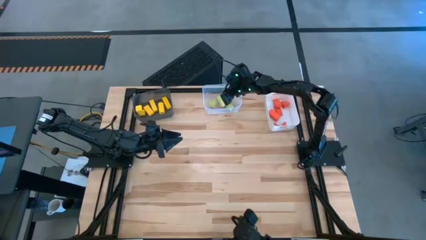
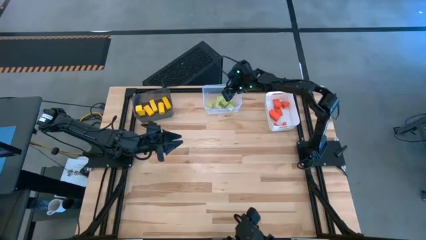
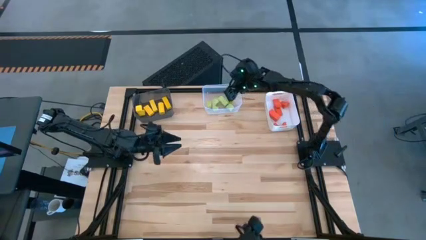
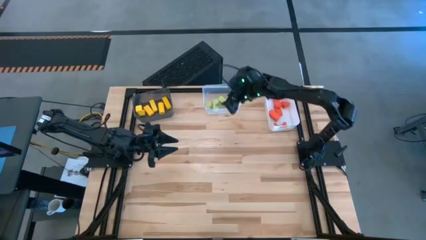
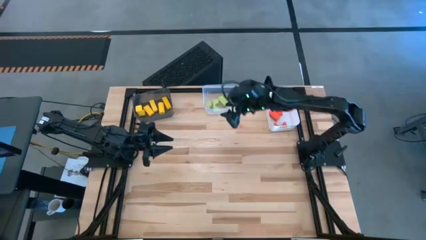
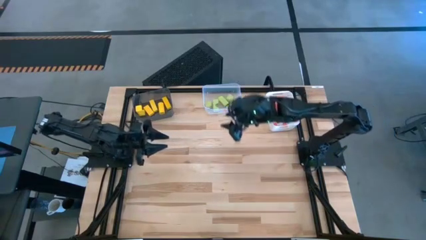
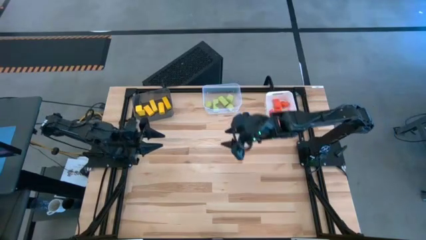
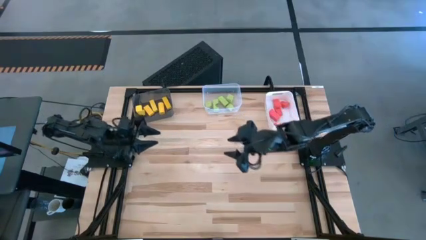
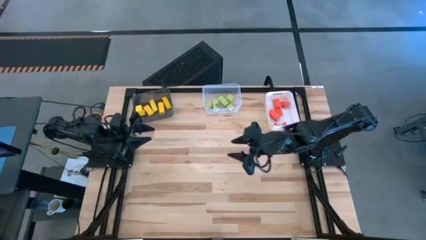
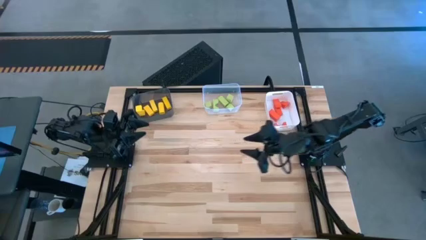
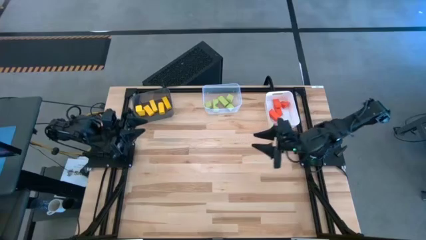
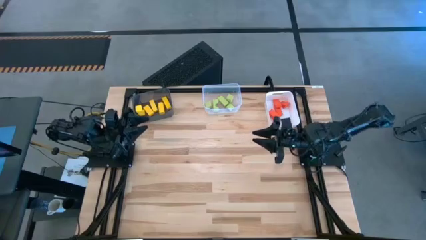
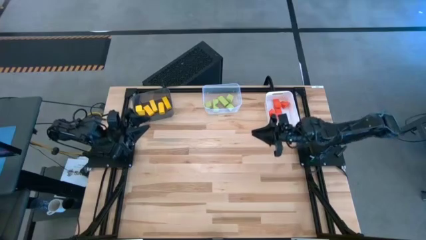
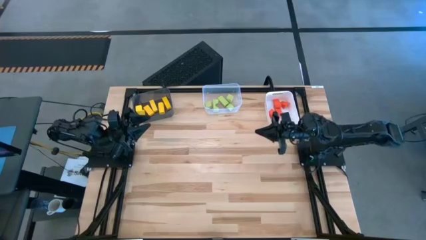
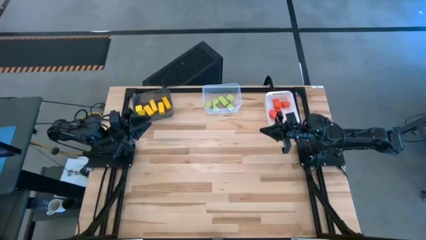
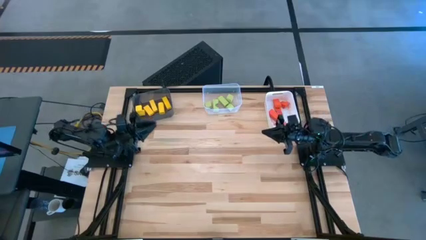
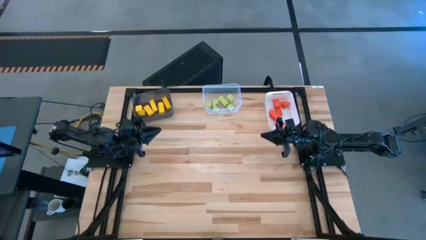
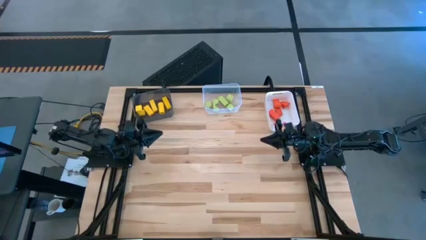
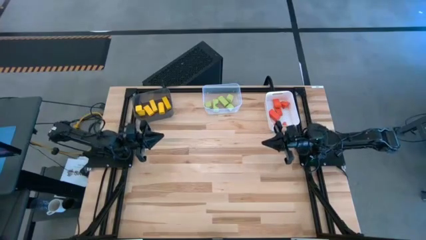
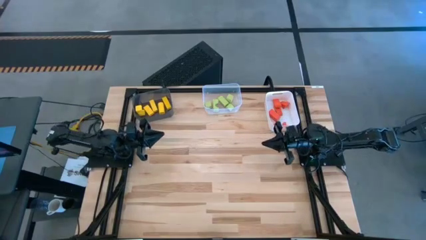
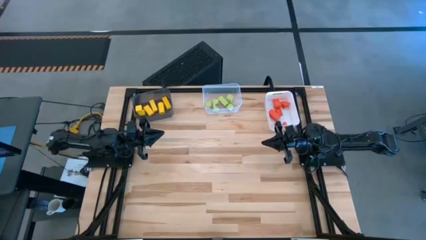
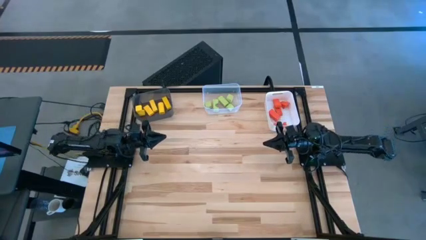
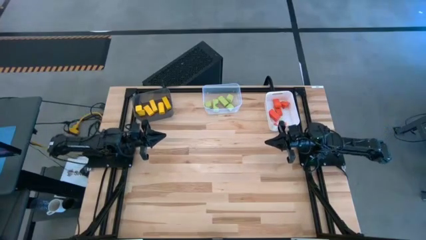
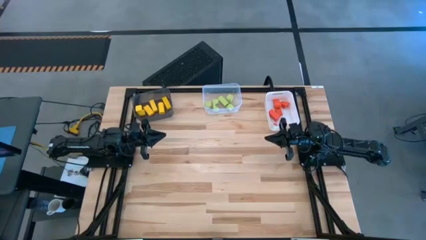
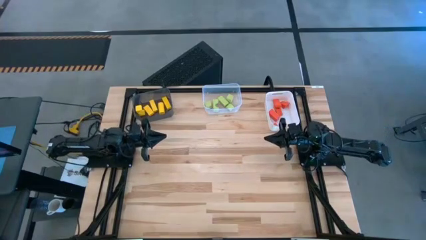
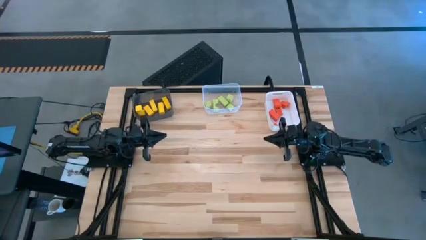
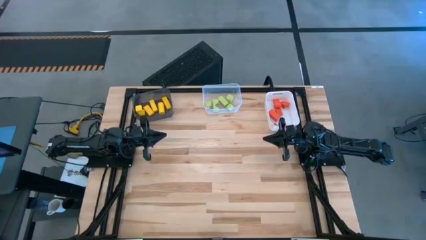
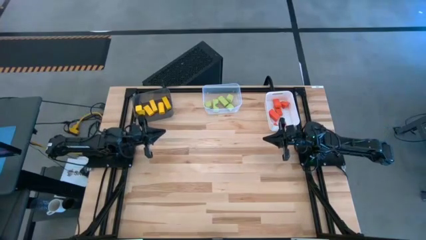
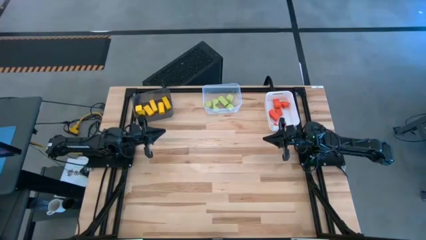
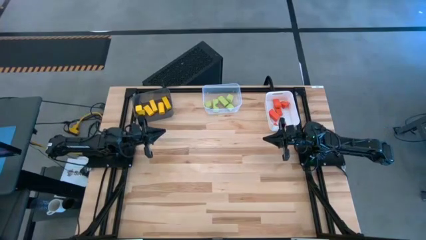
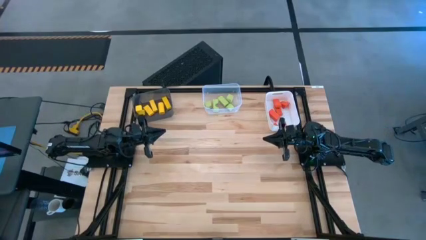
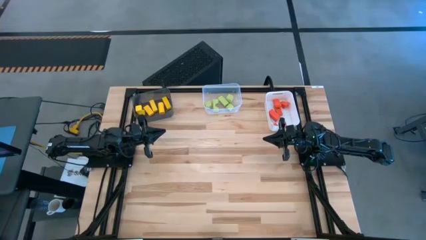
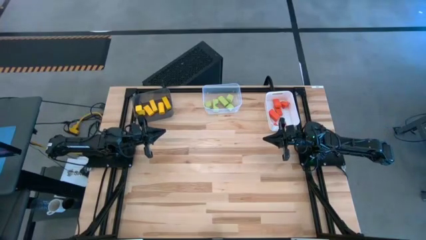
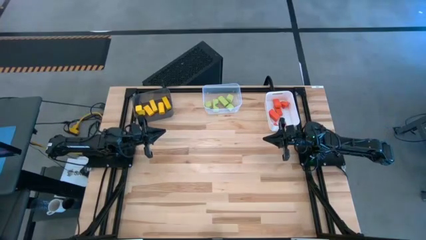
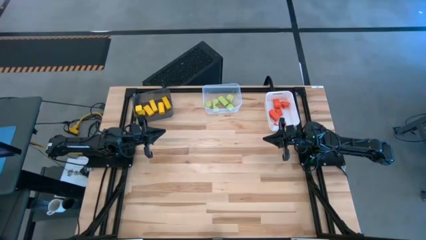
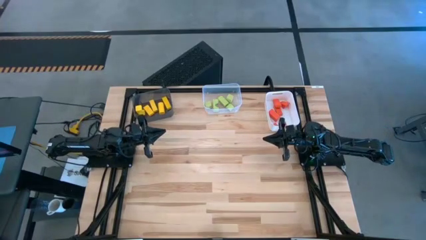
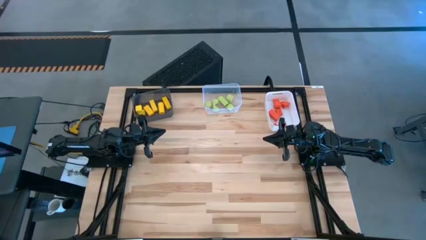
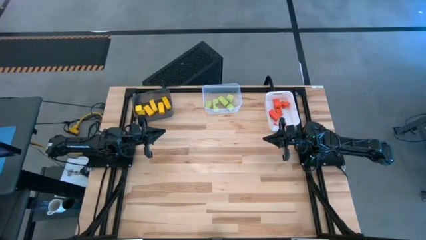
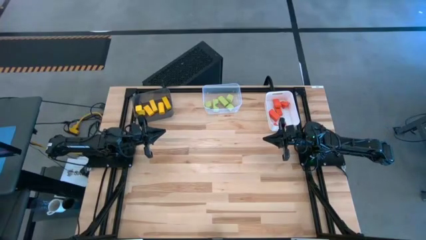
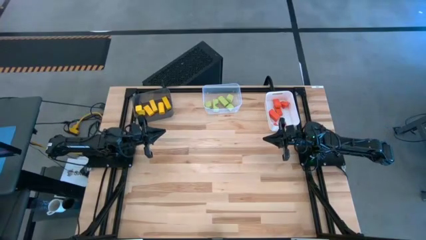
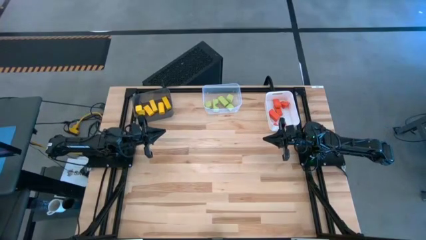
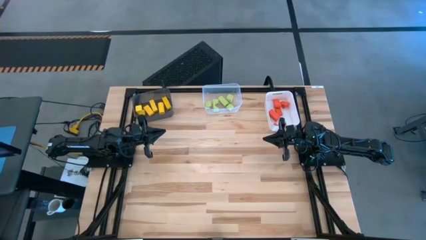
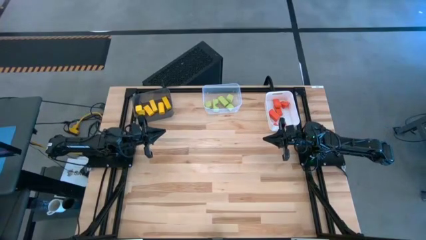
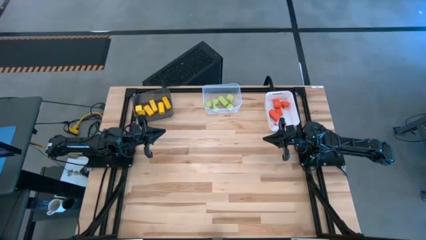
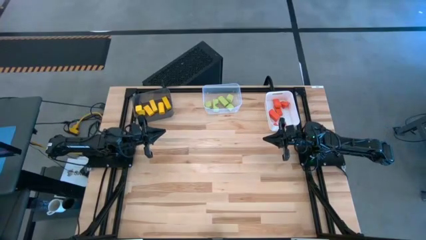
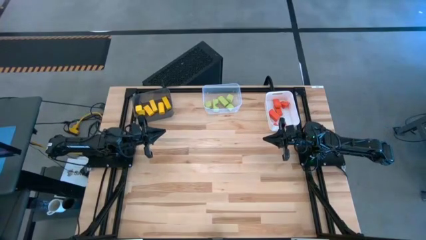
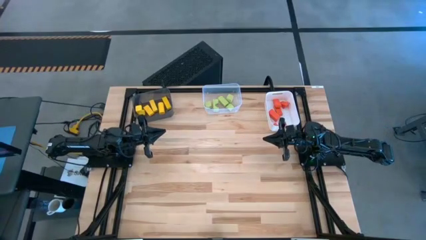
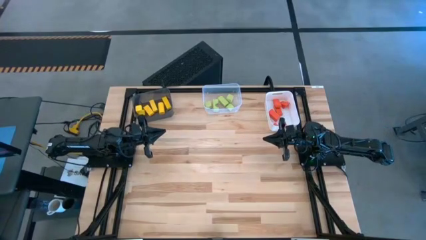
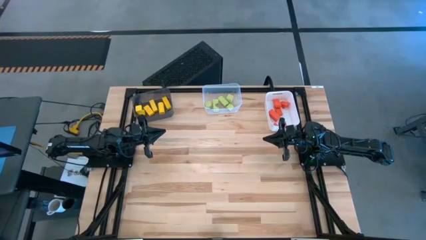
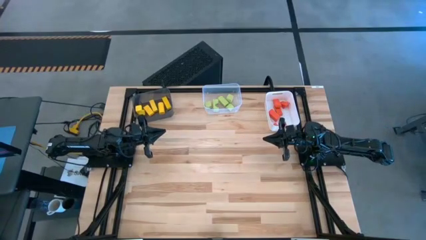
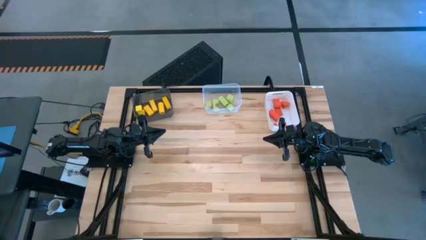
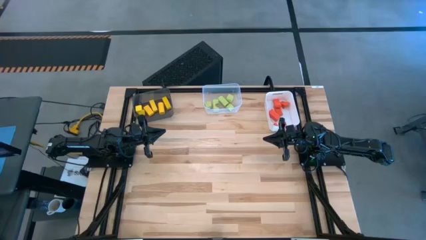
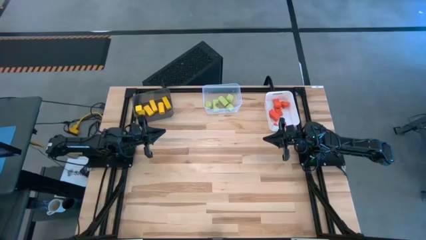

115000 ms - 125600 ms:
Task: Sort & place blocks by color
Return to Home Position

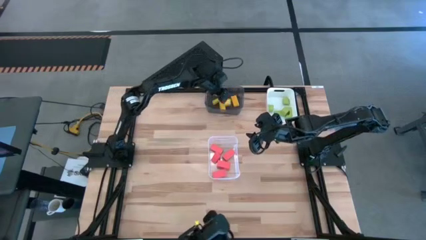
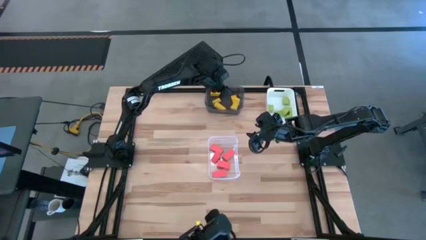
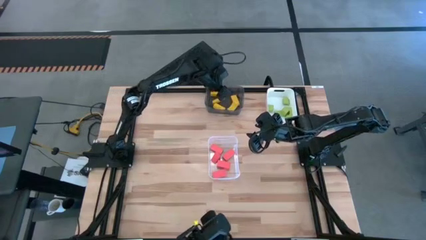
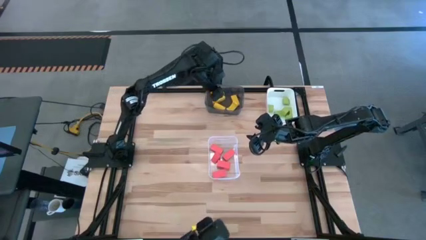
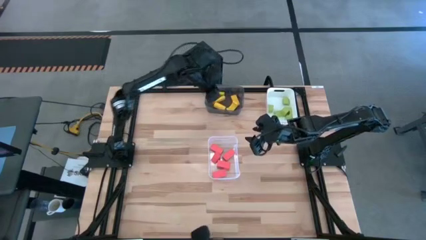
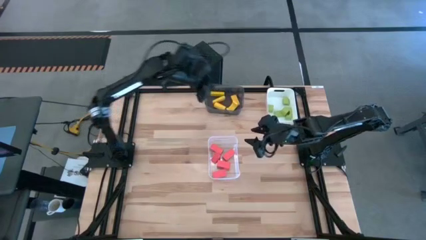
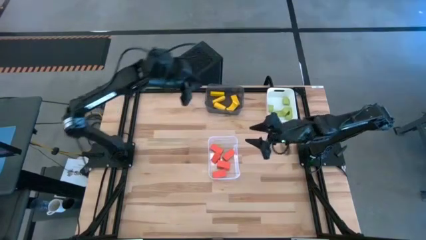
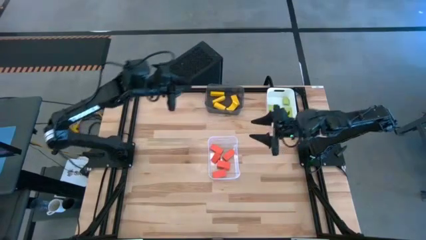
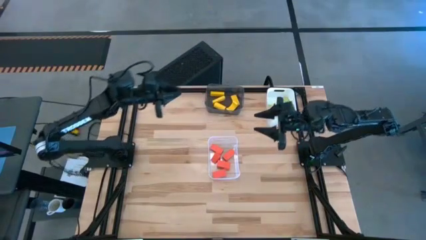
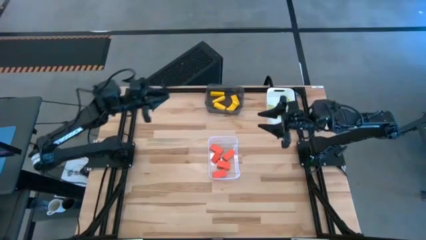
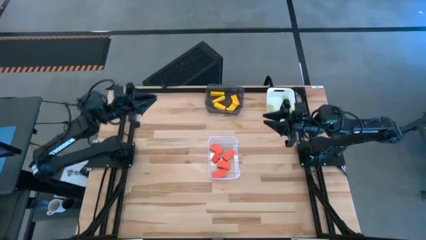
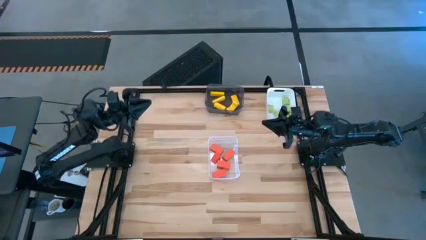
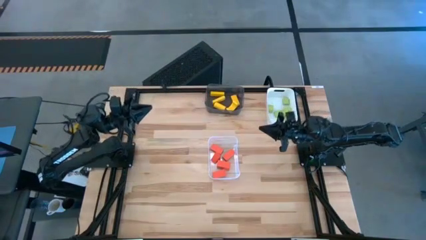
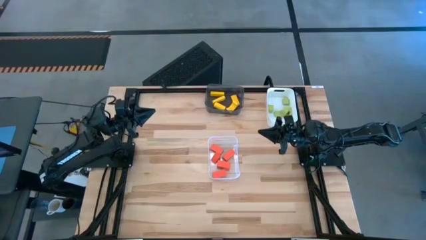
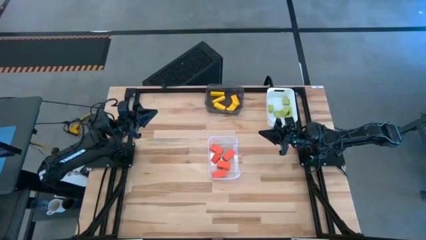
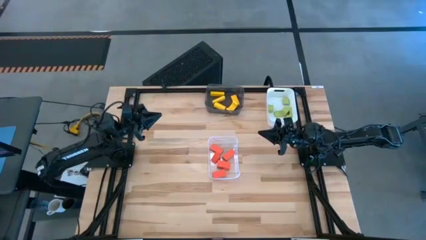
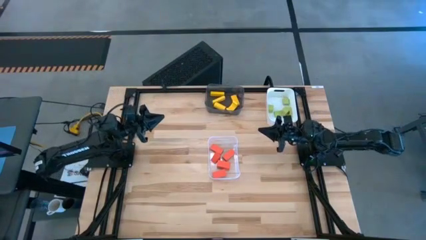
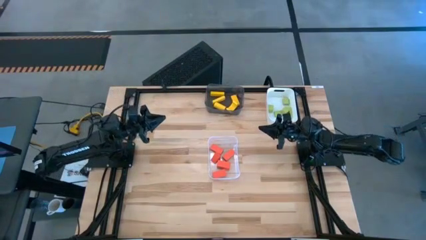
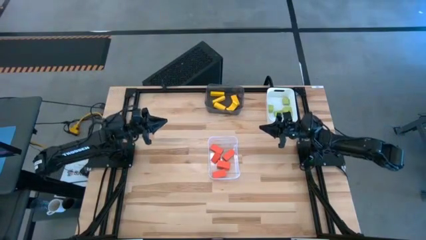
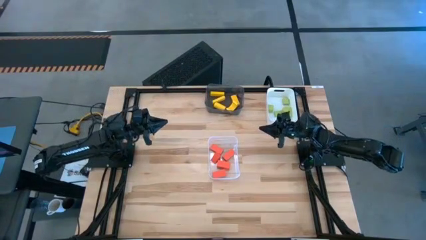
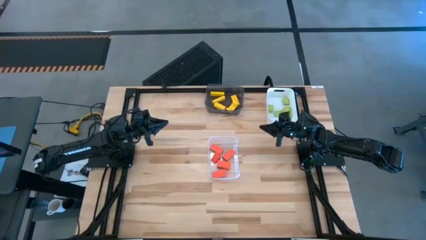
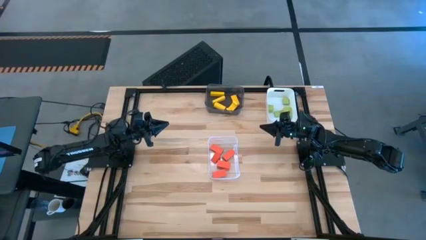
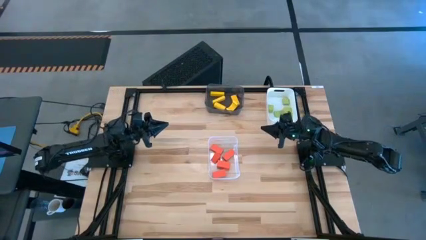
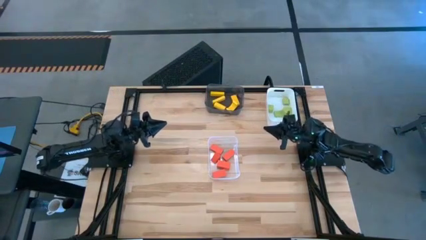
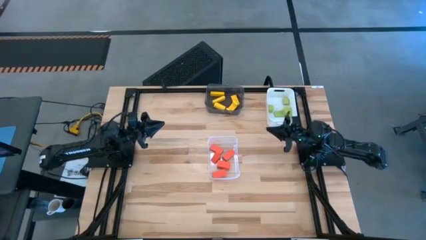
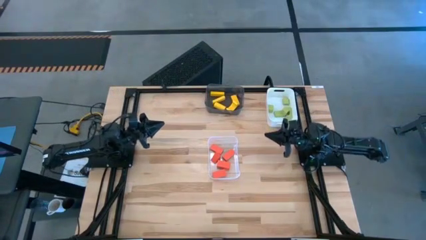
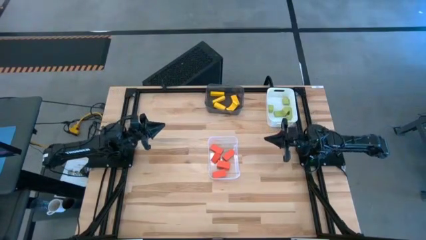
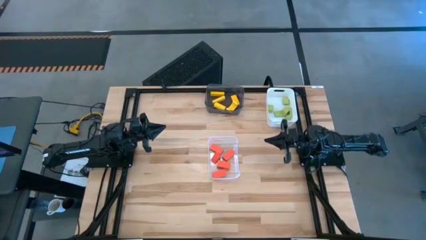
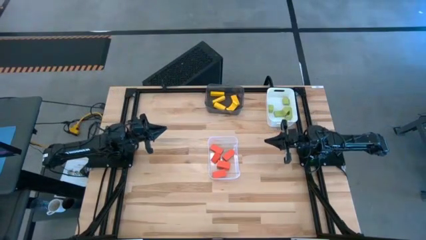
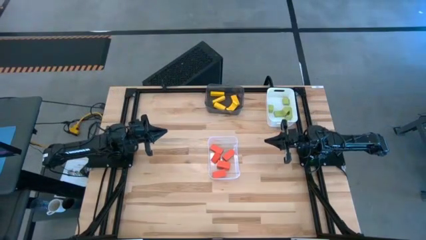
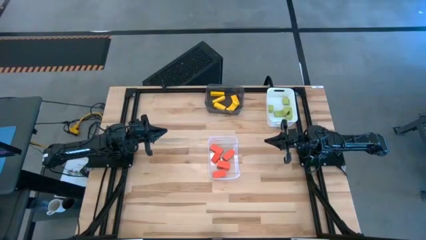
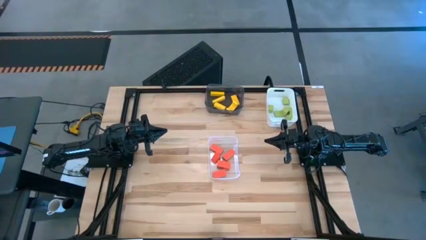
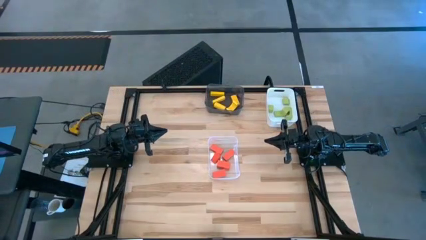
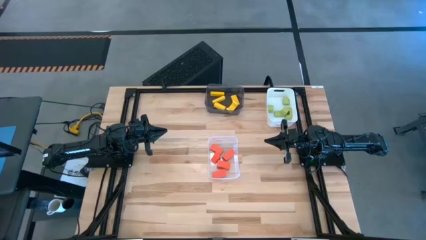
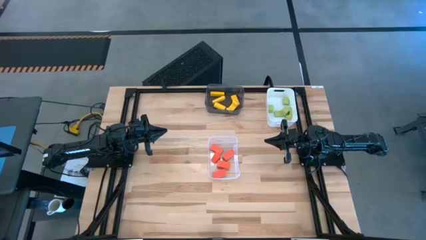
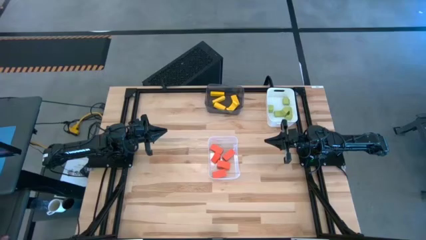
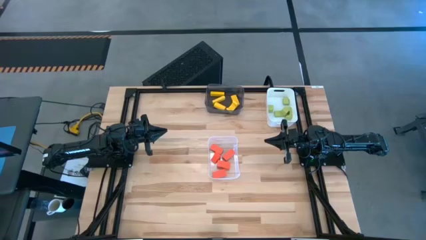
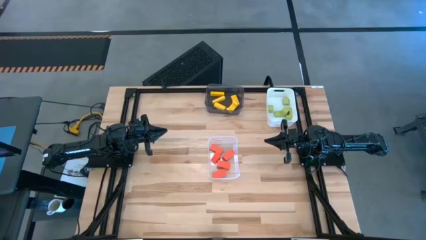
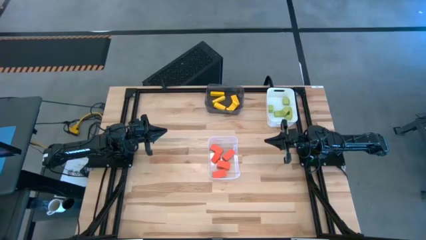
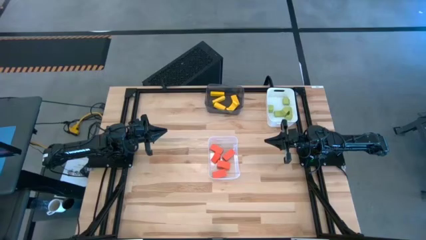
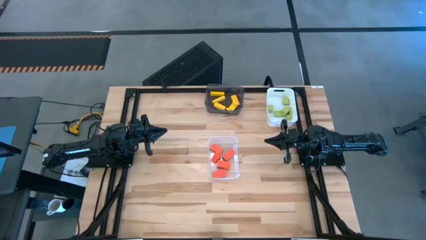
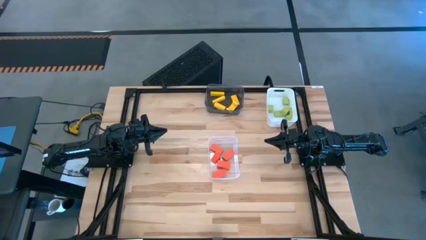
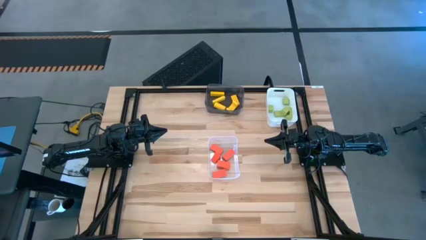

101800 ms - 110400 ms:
Task: Sort & place blocks by color
Return to Home Position
